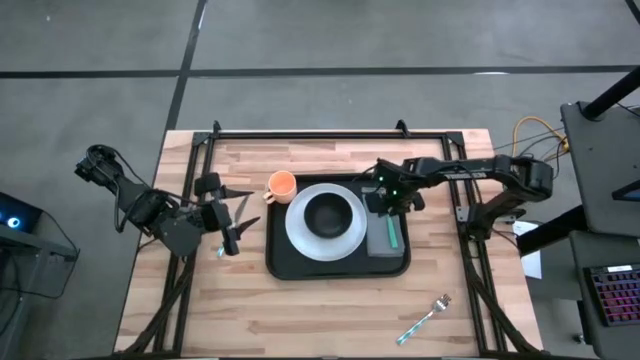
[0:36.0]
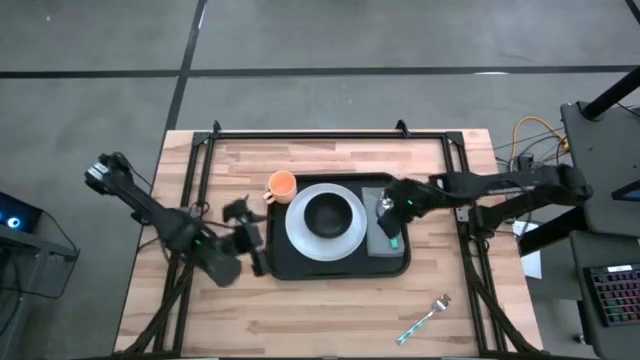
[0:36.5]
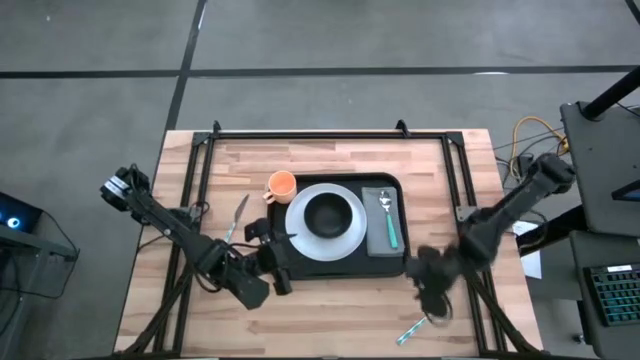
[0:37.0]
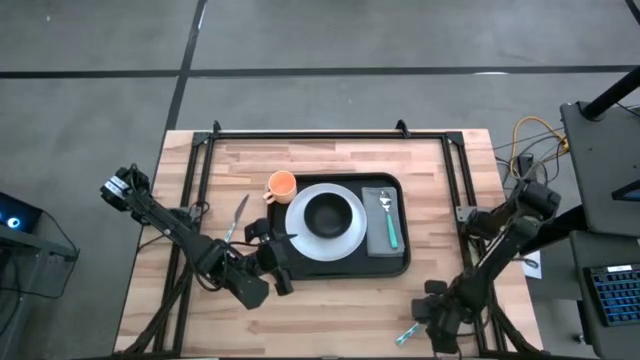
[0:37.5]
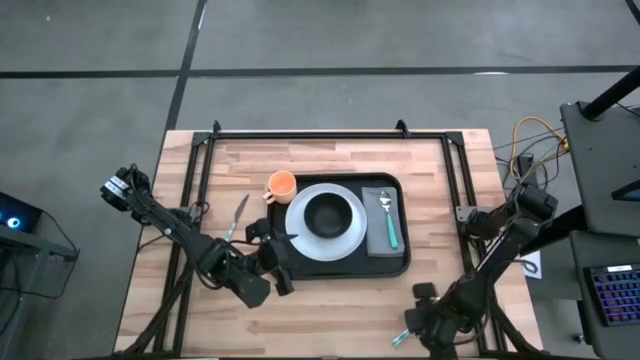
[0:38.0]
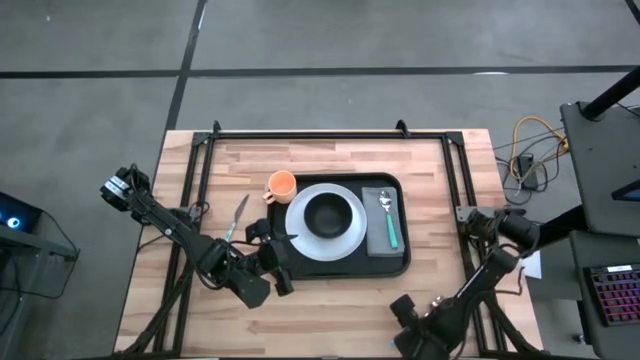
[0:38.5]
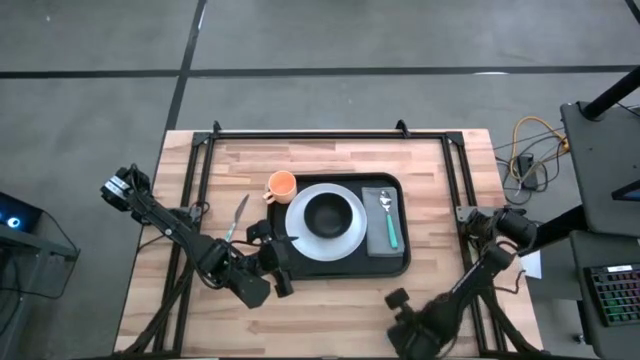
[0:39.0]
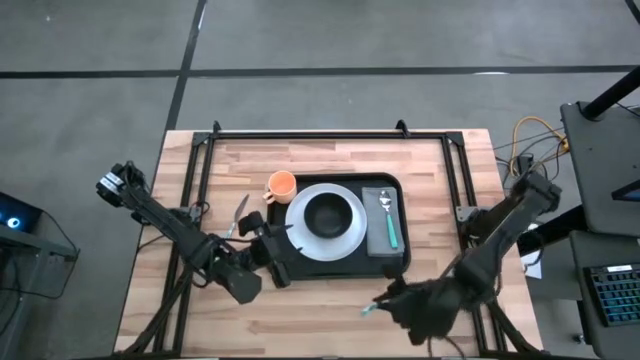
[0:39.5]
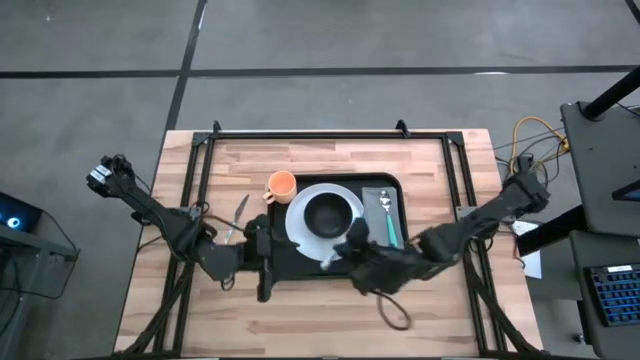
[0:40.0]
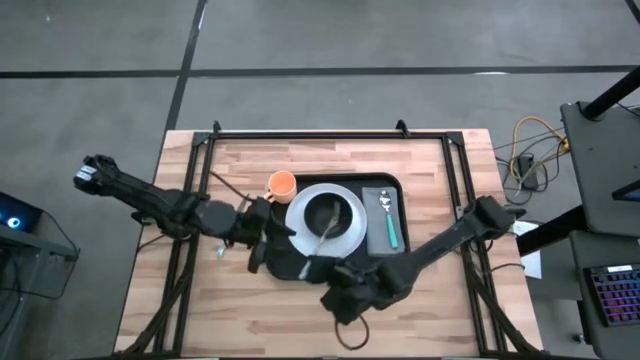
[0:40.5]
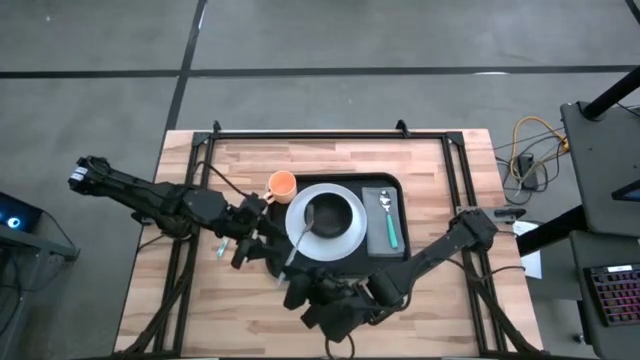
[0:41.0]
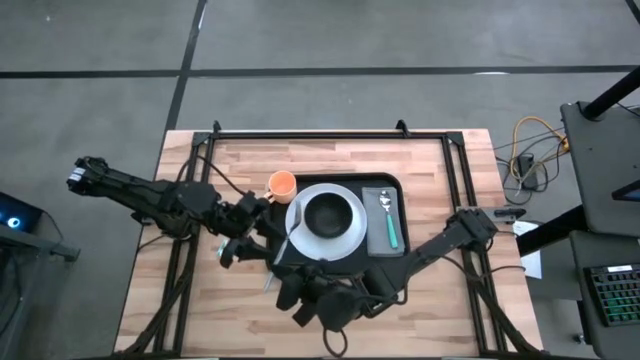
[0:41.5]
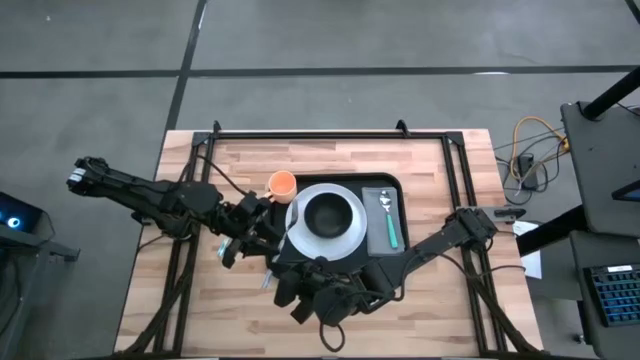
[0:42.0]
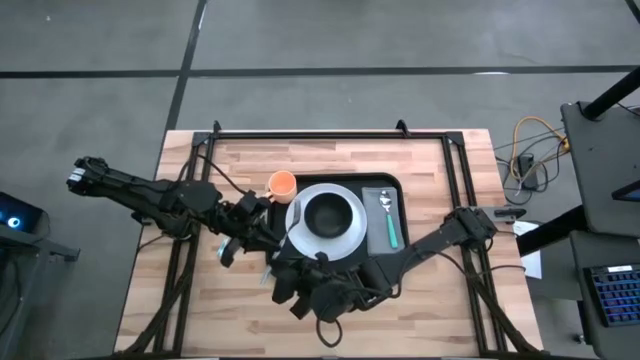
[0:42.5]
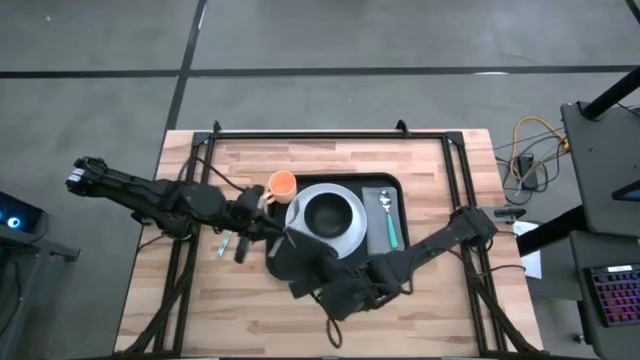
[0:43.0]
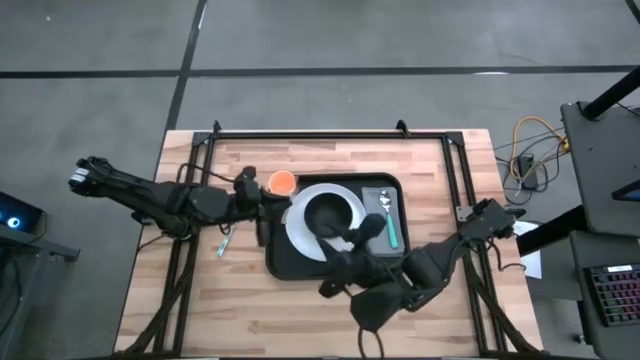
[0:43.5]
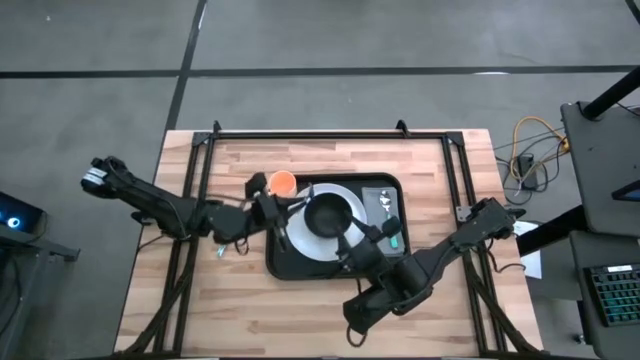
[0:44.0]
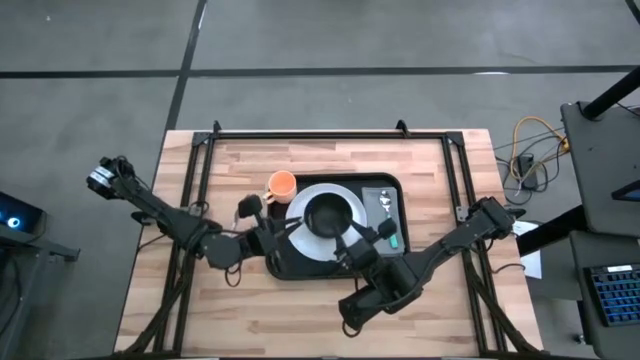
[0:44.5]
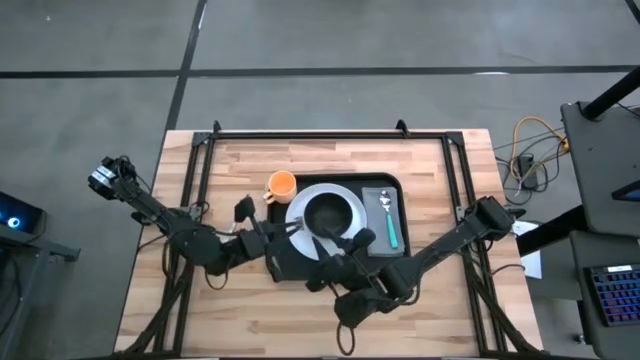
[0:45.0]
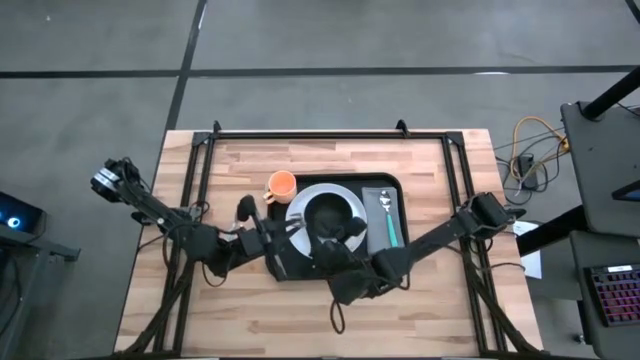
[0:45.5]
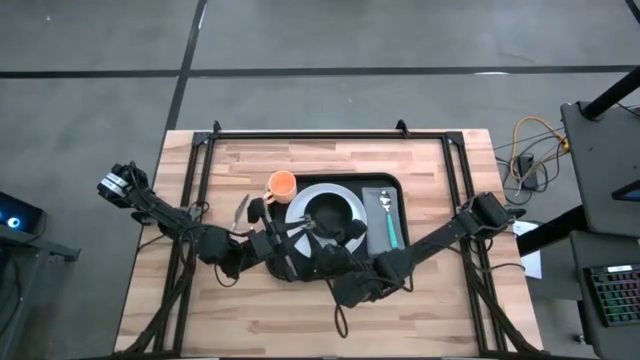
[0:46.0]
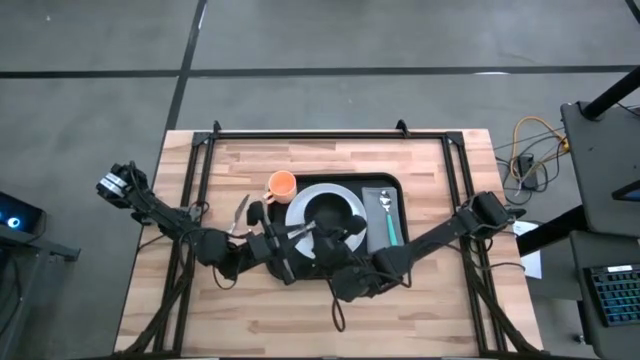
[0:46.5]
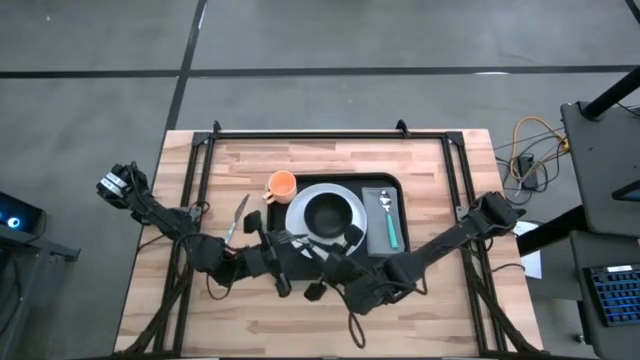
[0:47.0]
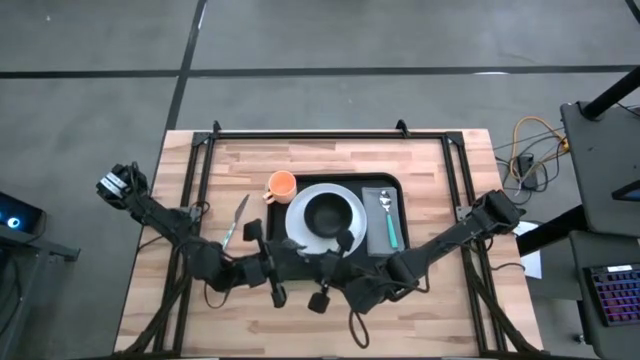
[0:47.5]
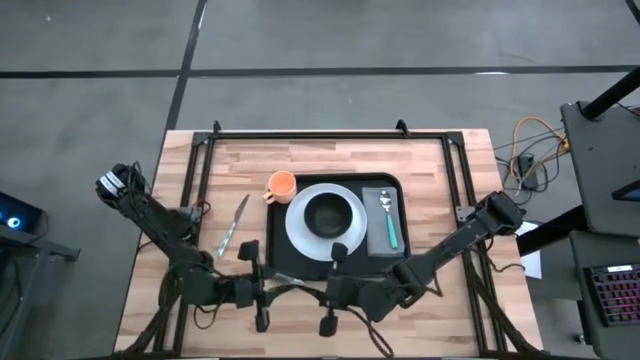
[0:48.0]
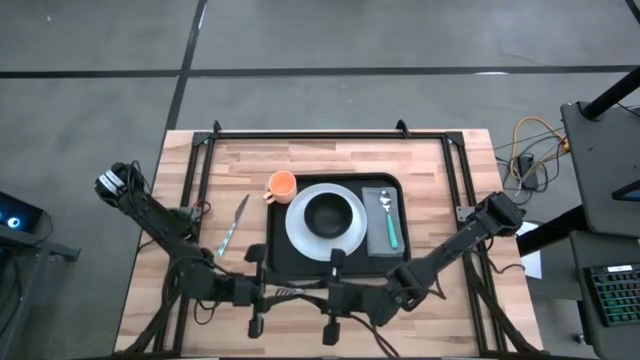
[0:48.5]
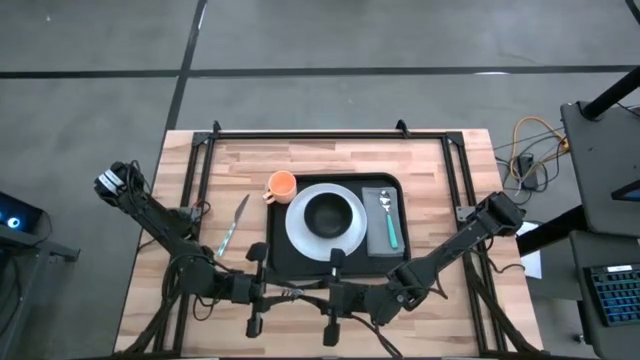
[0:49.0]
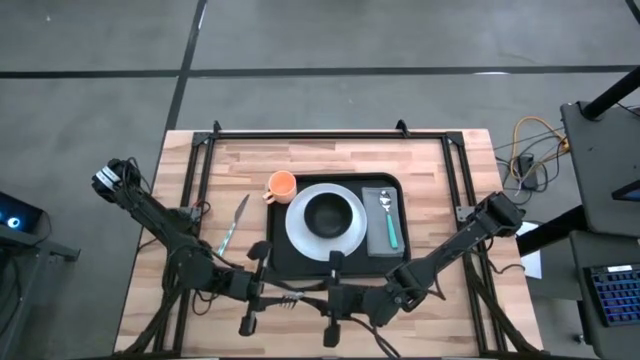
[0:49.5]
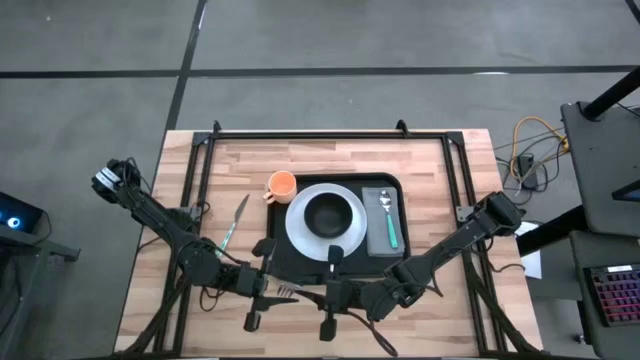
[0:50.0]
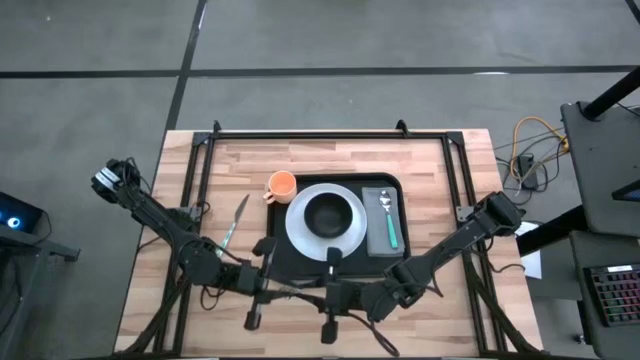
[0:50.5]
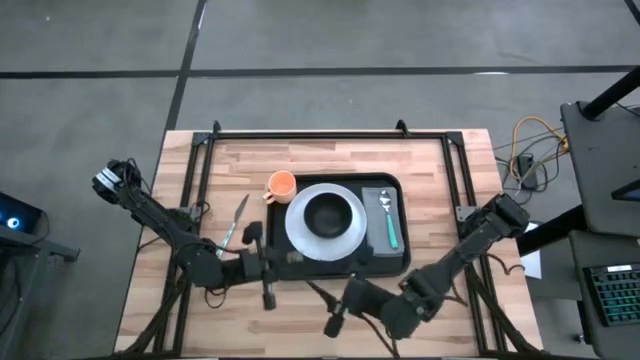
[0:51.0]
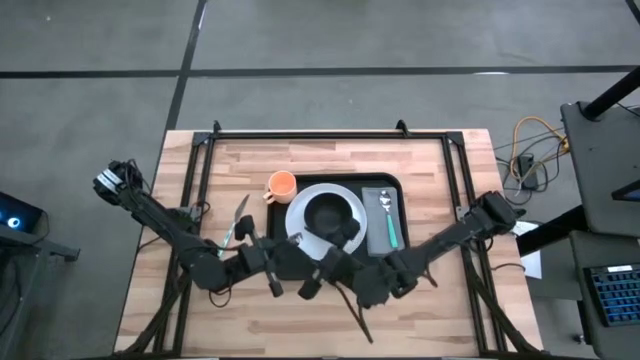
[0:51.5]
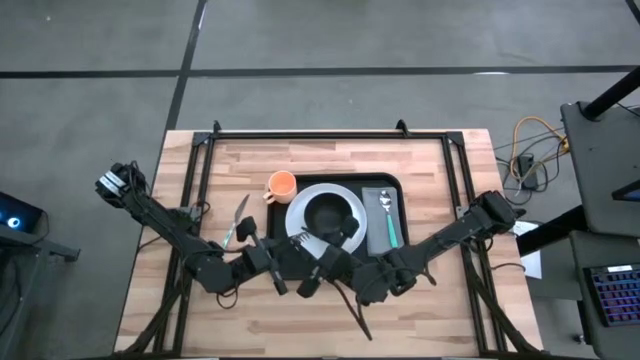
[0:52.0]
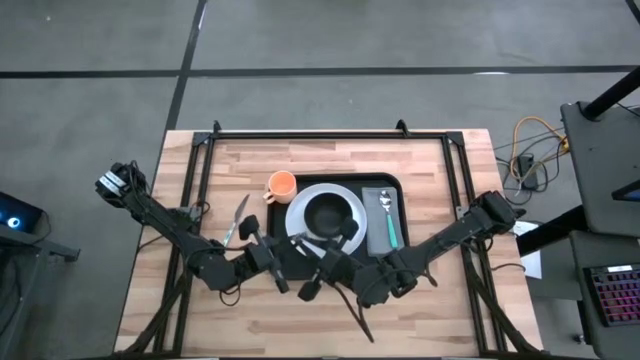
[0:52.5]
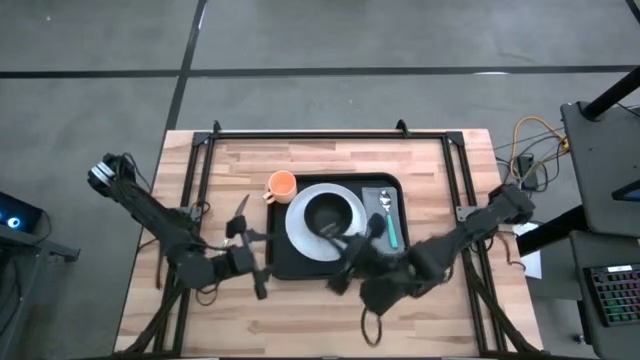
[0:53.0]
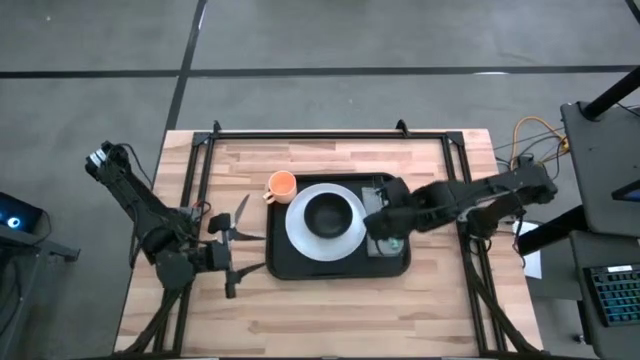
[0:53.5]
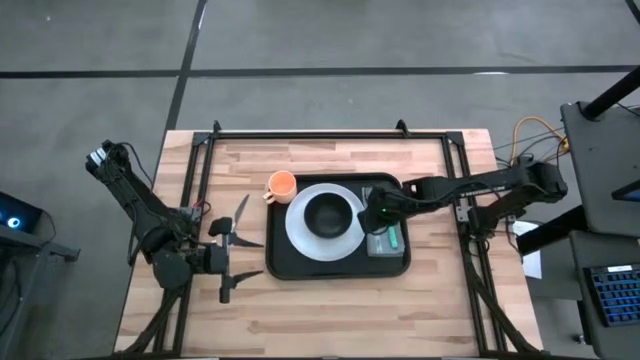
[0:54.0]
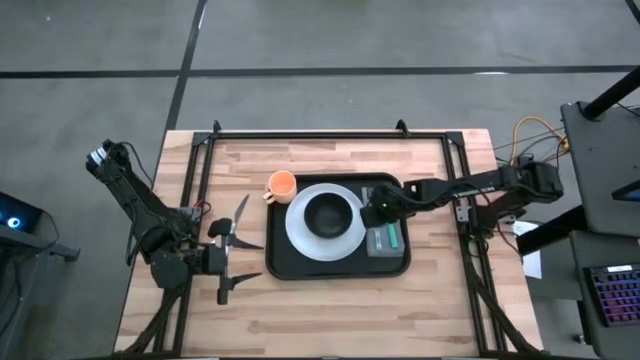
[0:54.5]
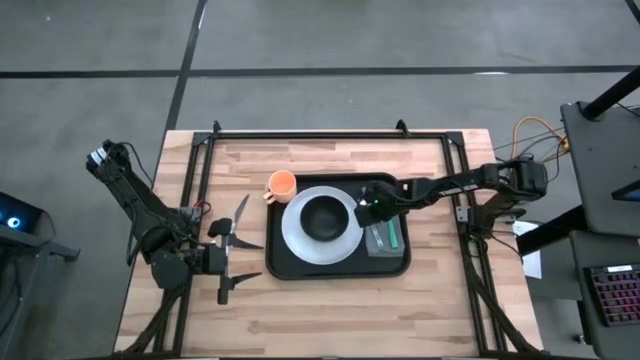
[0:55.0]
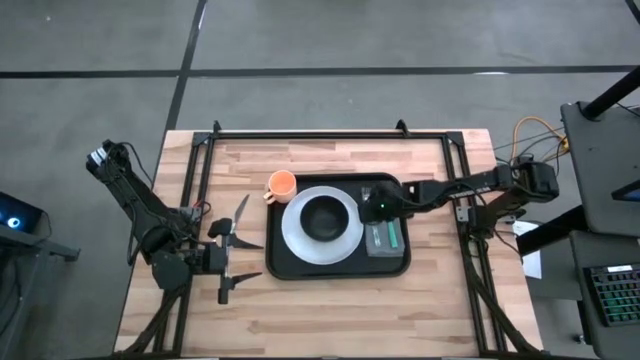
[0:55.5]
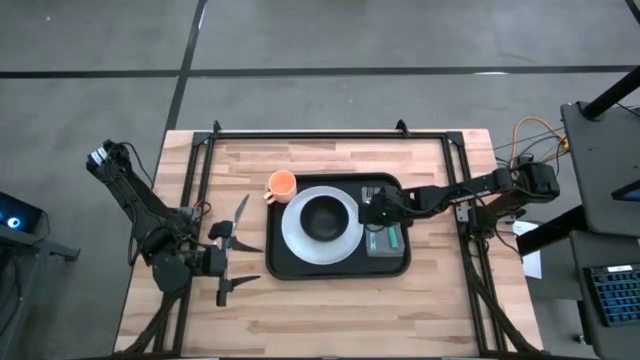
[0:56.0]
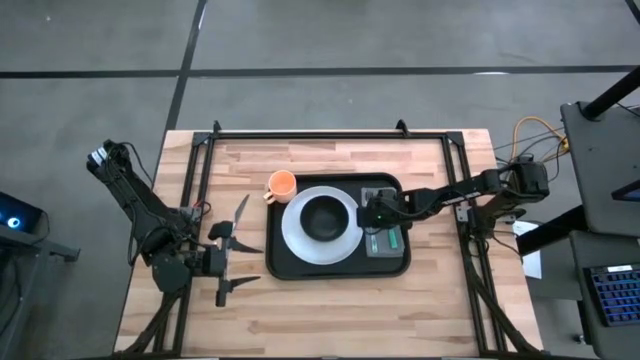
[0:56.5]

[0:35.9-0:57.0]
Task: Set up tray
Put the green fork on top of the grey table napkin on the black serving tray to the left side of the green spoon
